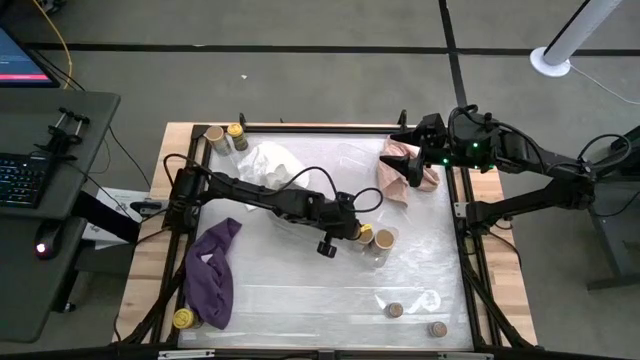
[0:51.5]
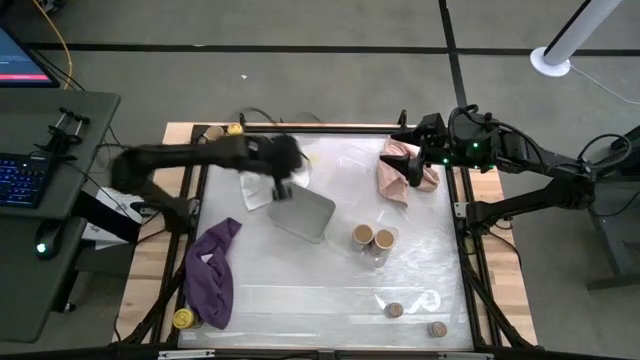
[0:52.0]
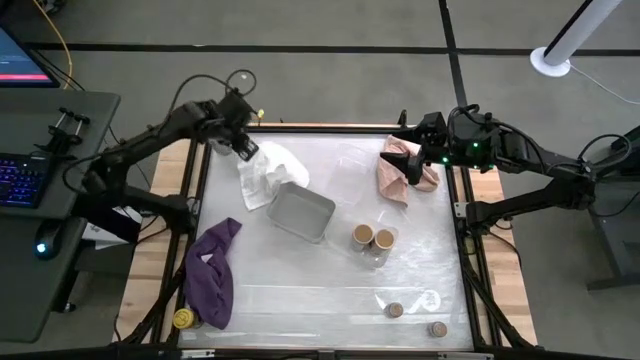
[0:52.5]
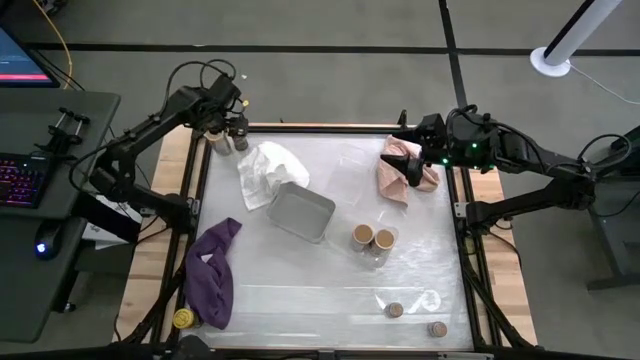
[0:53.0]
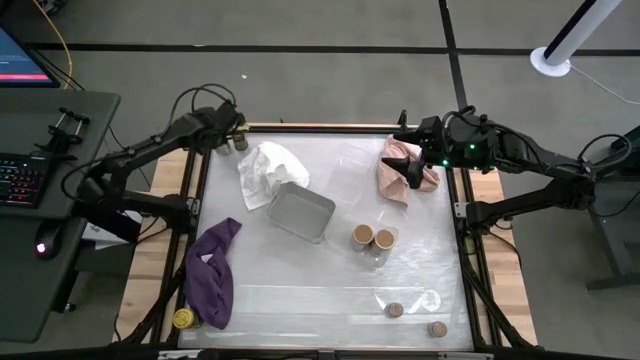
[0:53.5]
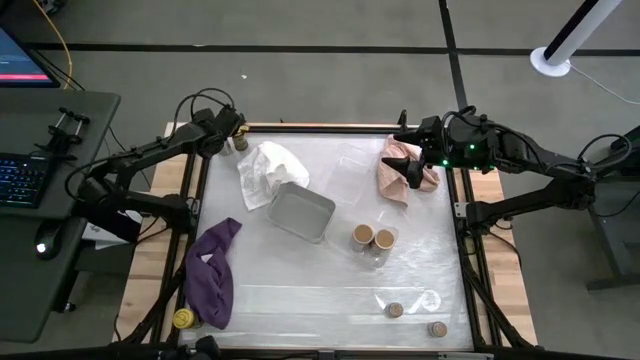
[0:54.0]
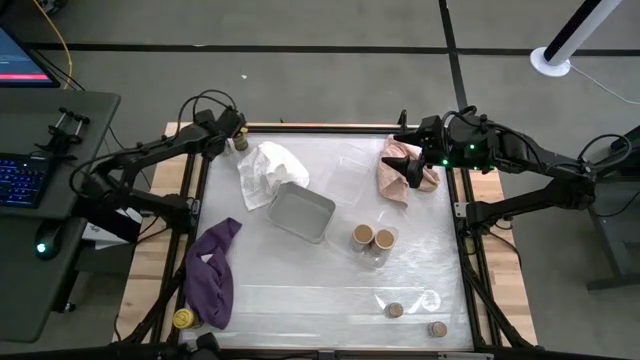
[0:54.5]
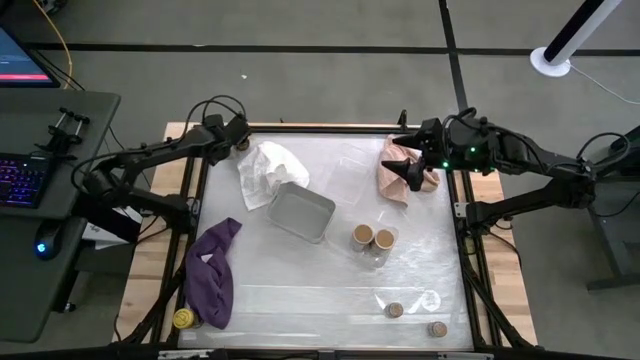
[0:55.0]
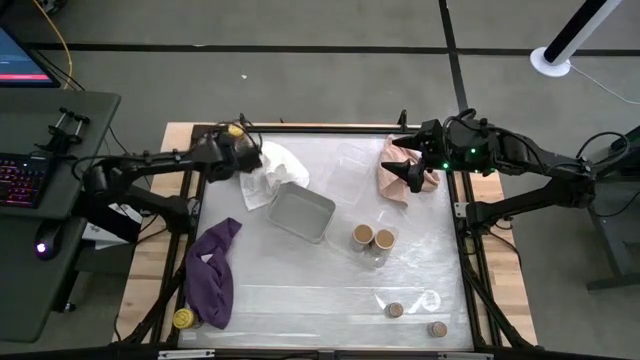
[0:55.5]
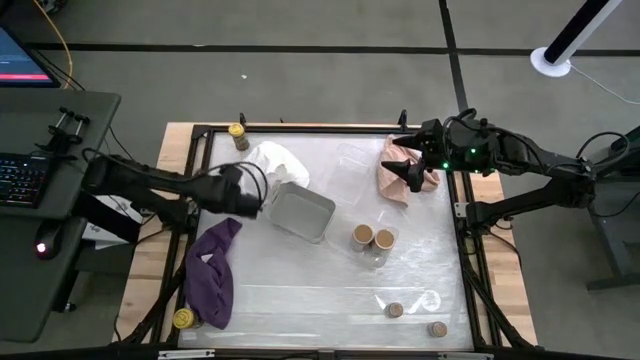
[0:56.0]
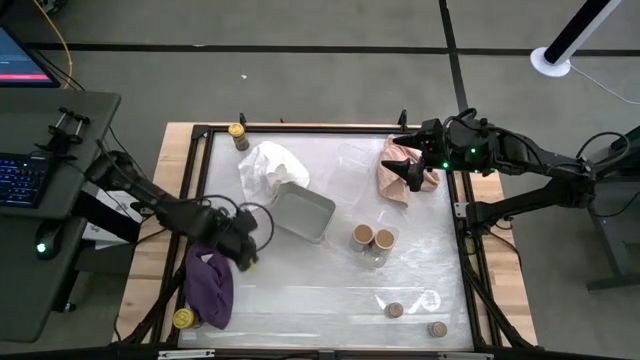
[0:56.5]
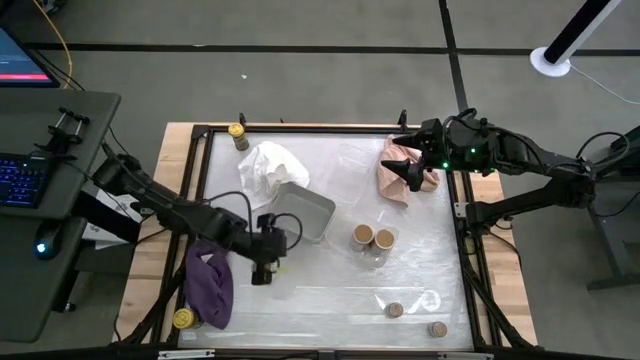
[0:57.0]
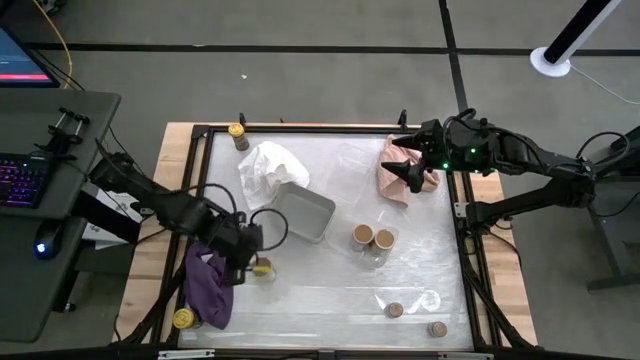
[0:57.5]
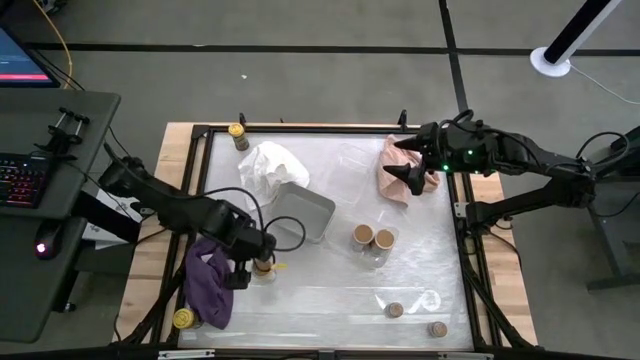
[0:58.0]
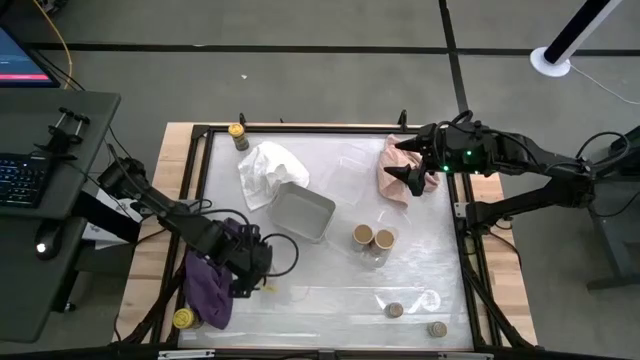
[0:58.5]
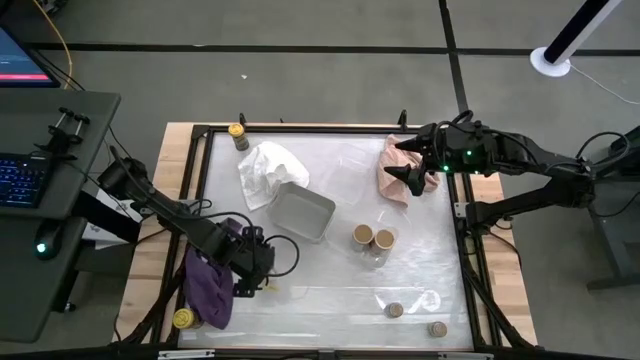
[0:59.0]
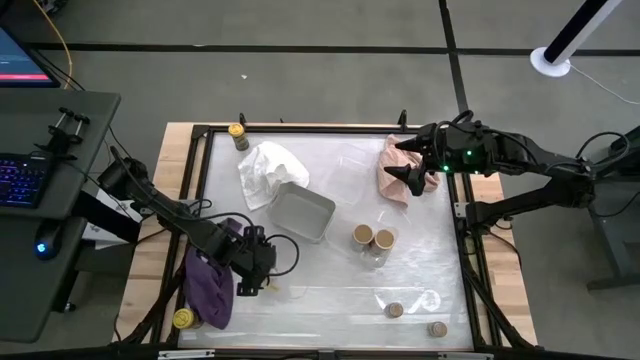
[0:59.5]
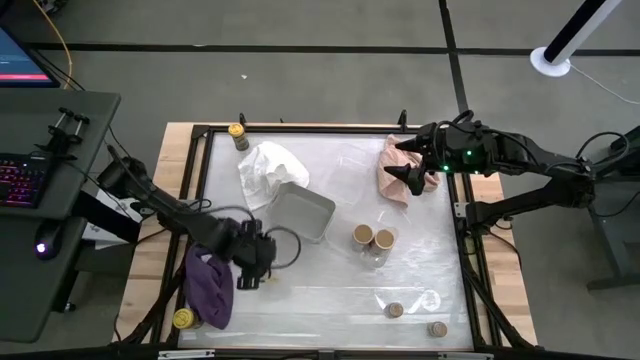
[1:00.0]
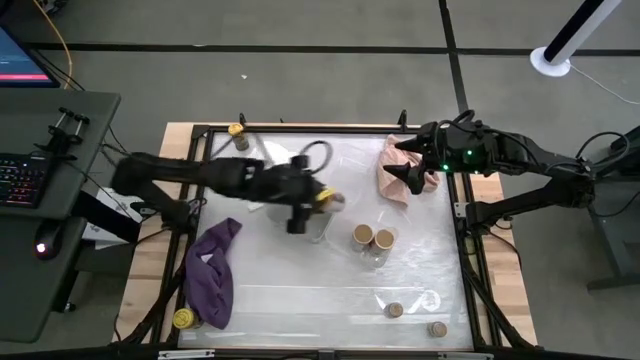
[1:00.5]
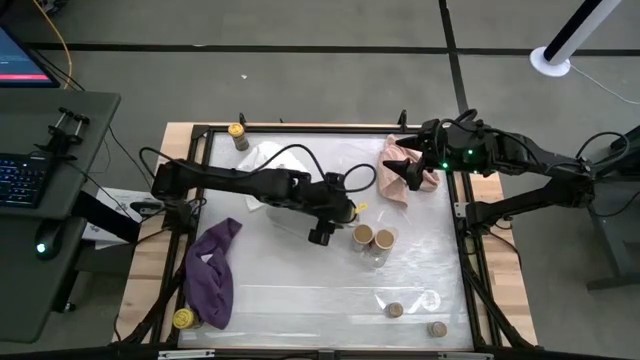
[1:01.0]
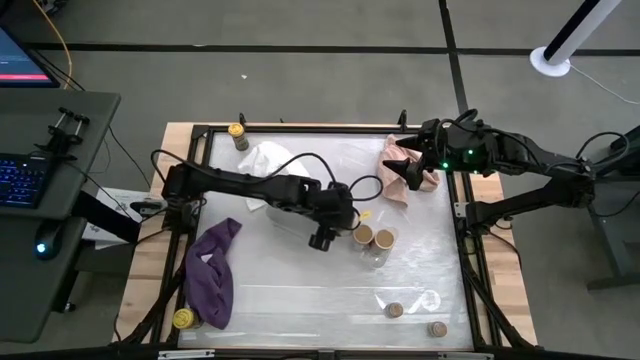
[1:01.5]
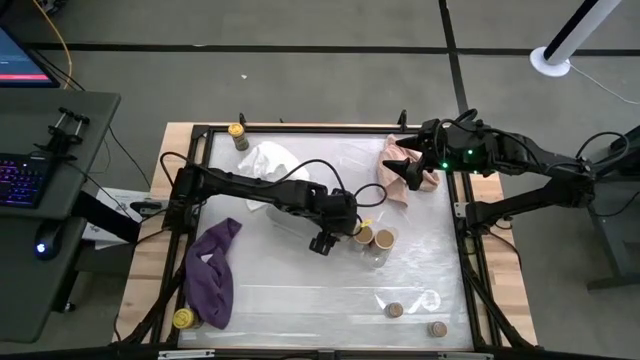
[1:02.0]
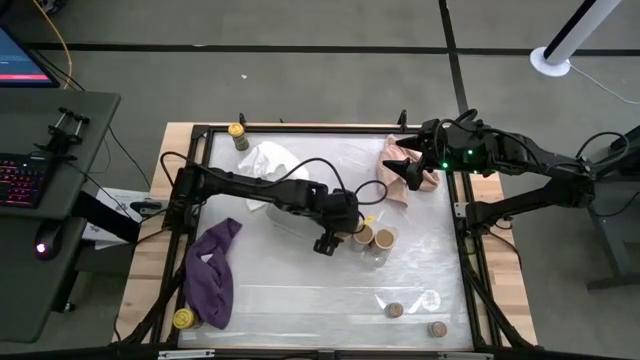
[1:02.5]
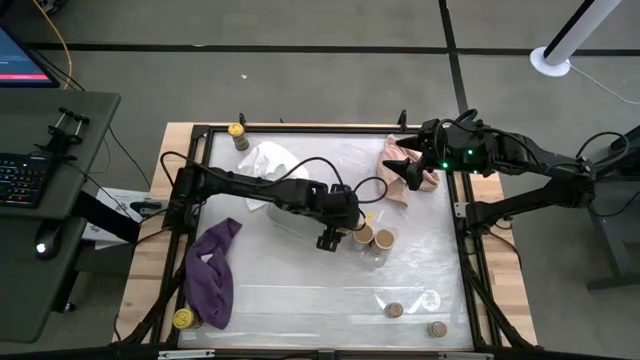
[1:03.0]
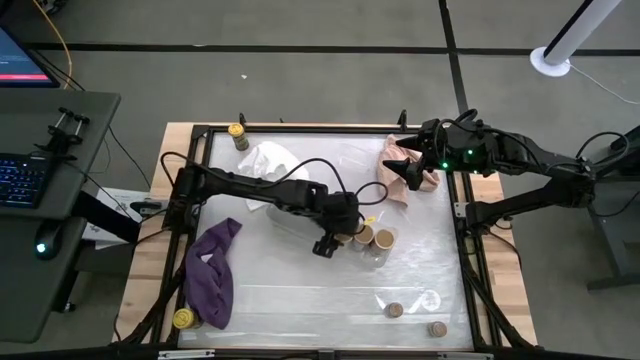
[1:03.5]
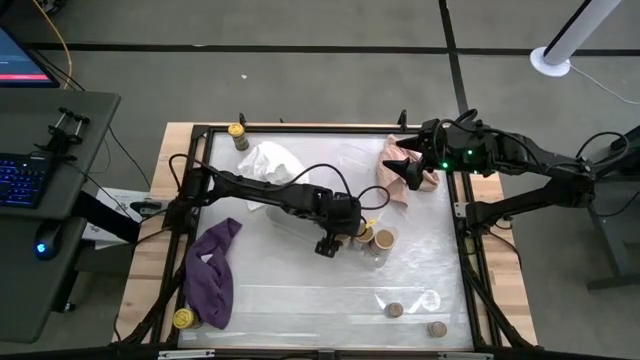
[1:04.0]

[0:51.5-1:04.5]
Task: Sort spices by type
Put the gold seasoning bottle into the bottom transparent bin

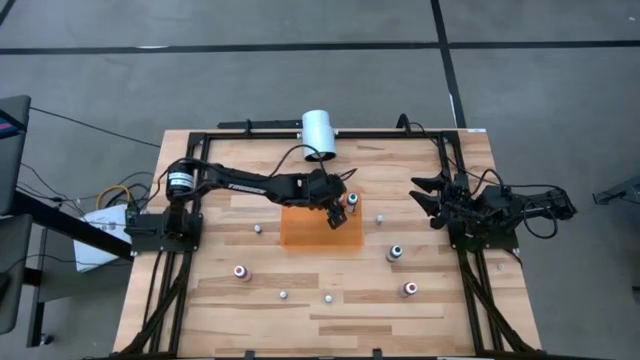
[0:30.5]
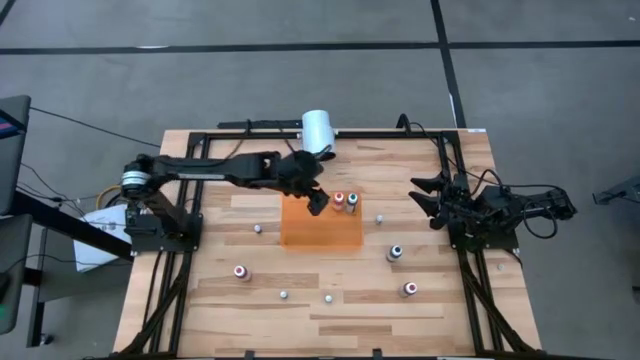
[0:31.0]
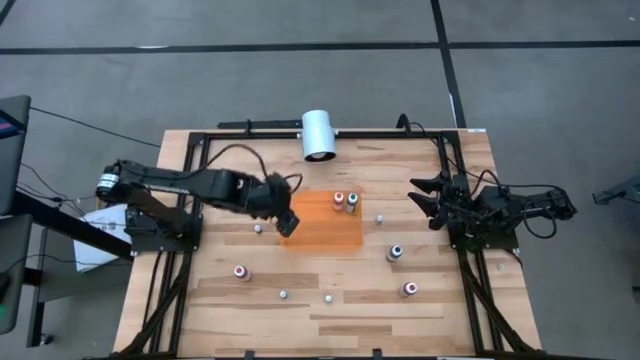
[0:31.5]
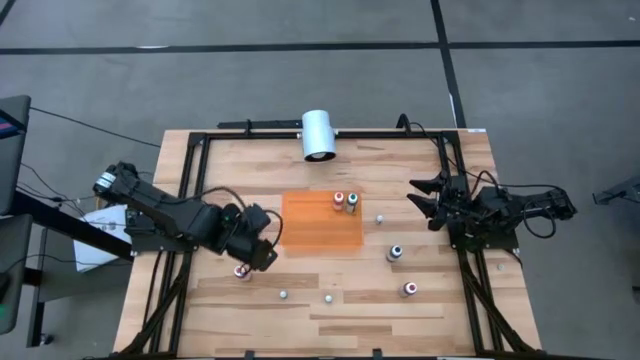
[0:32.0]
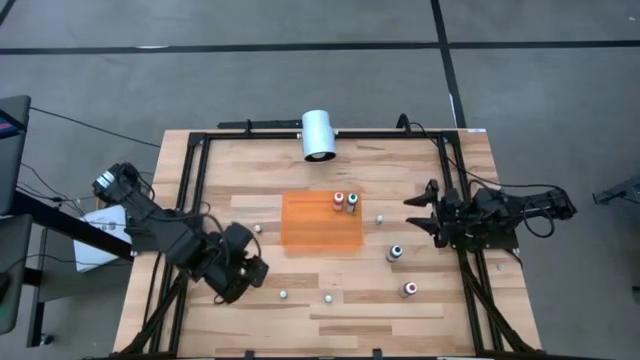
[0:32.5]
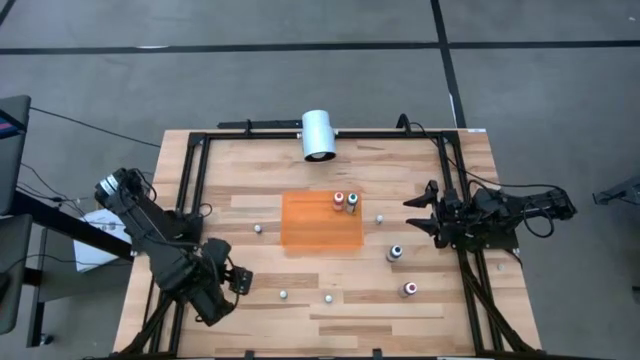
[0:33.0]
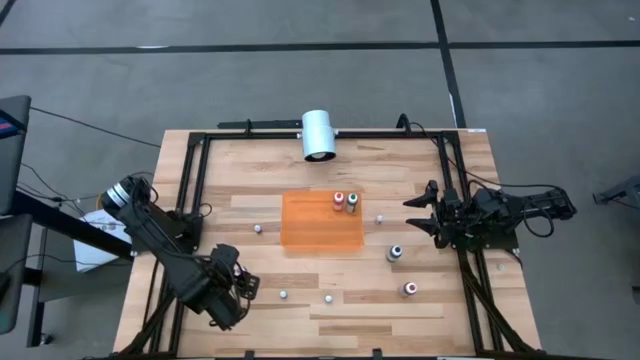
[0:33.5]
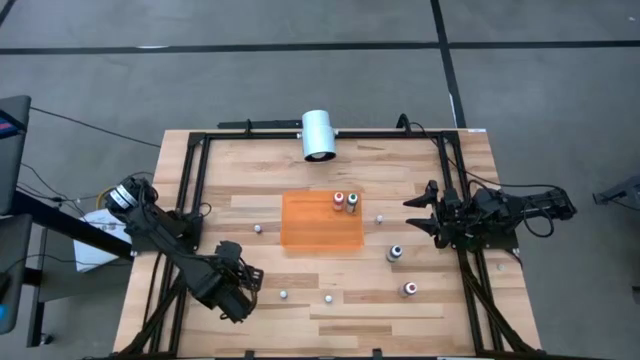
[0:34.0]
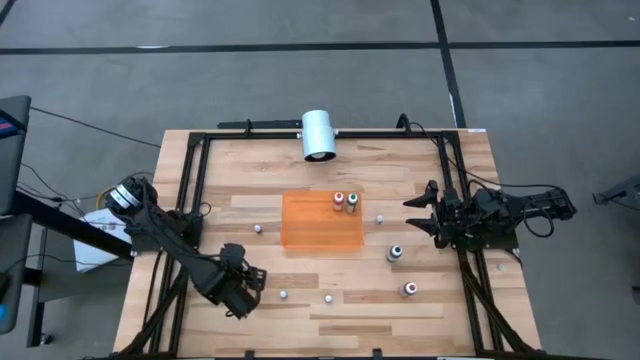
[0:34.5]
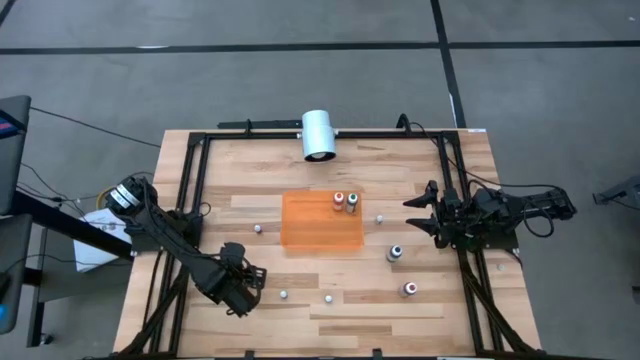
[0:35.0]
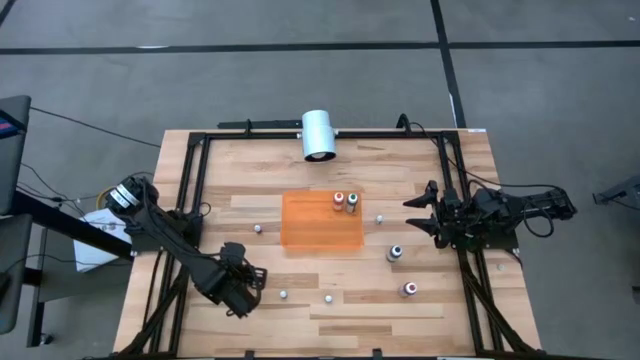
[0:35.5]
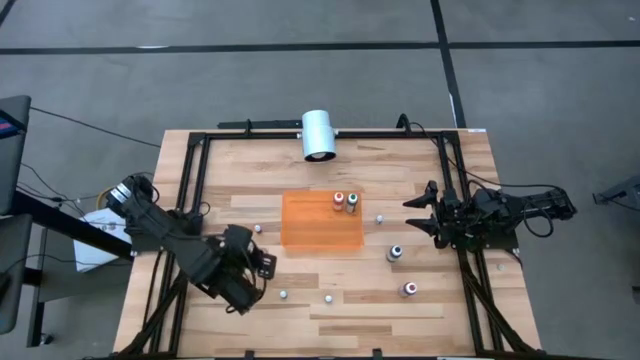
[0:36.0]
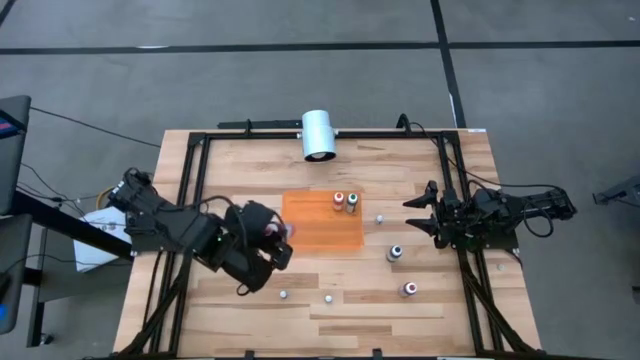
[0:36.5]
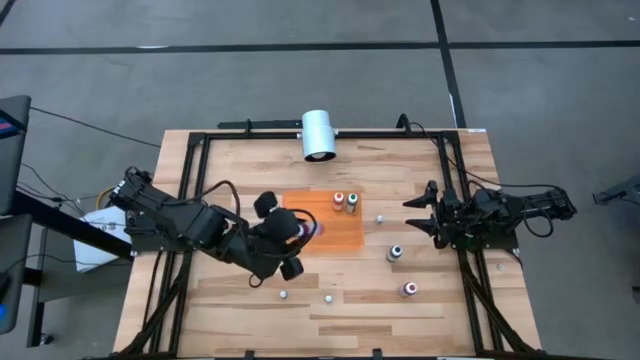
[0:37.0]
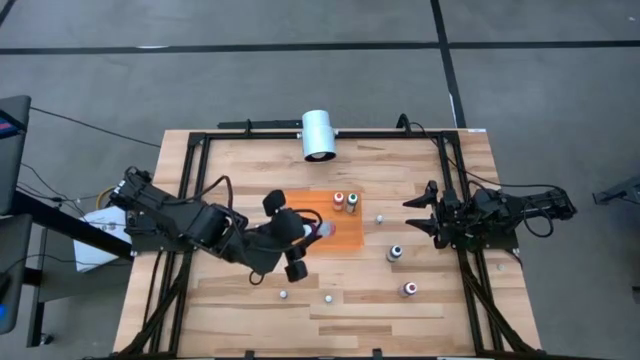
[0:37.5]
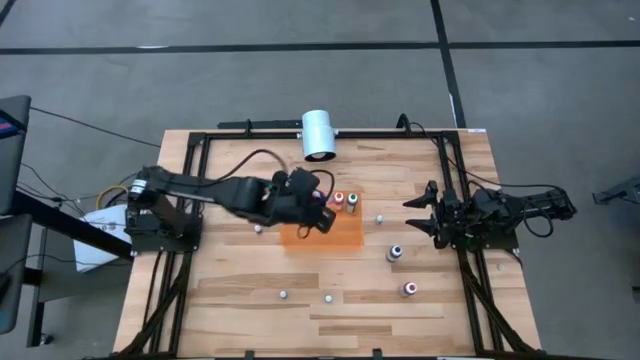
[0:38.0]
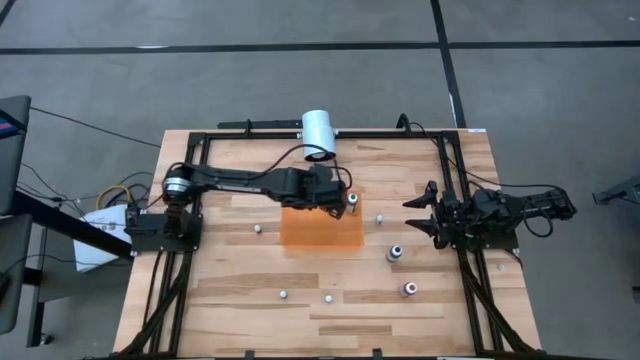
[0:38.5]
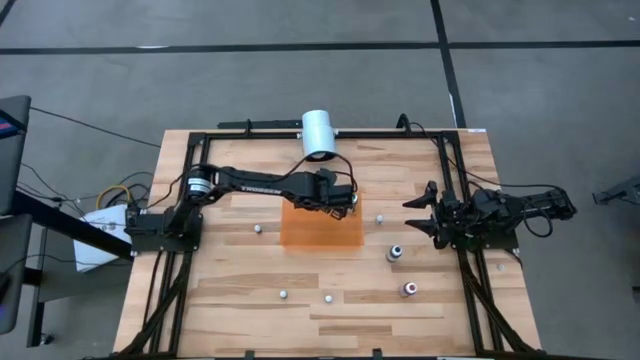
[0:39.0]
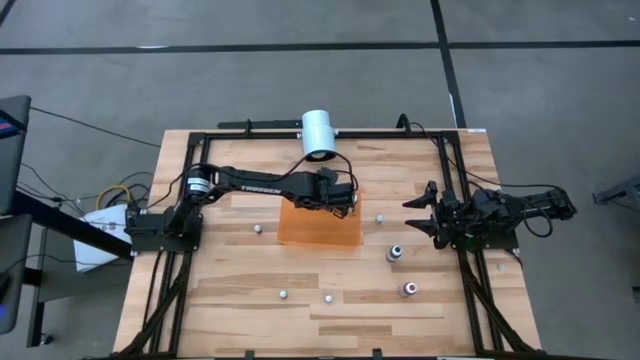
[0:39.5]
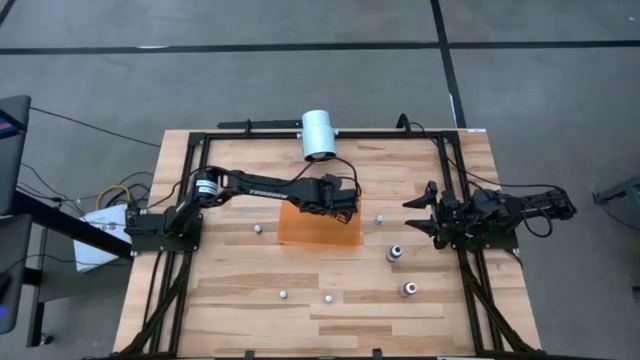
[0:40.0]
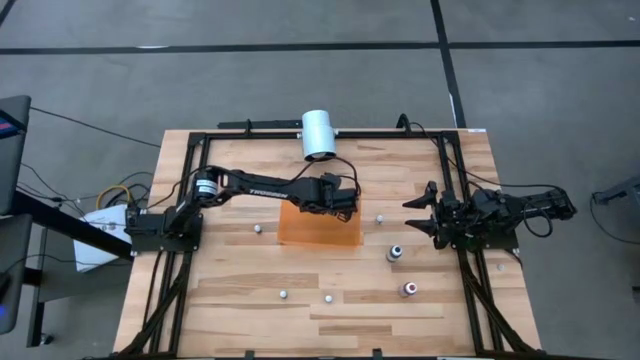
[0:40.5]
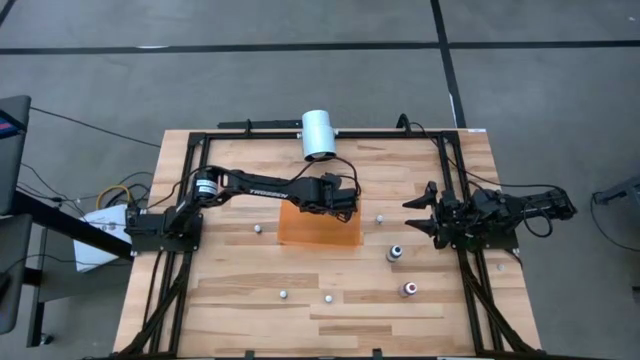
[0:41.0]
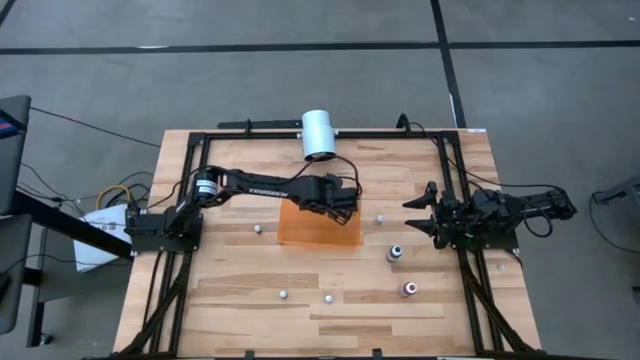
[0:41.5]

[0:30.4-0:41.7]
Task: Pick & Place food coloring
Put the large pink food coloring bottle into the orange bin
